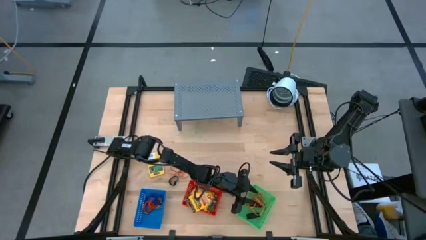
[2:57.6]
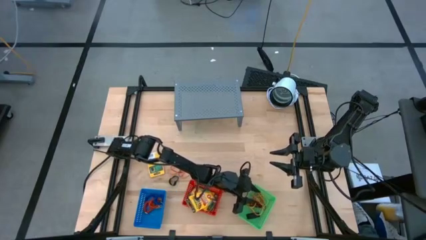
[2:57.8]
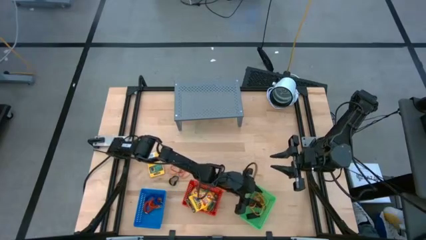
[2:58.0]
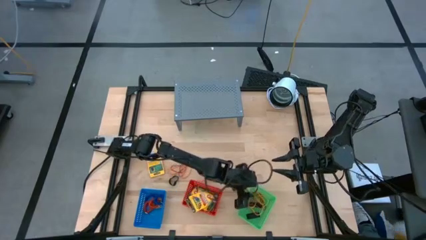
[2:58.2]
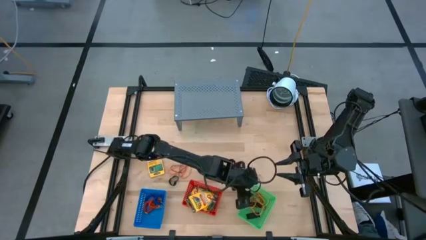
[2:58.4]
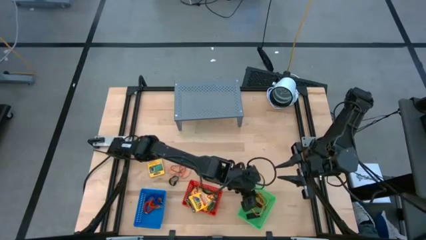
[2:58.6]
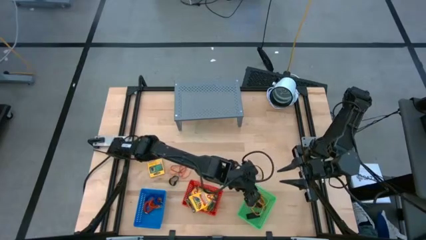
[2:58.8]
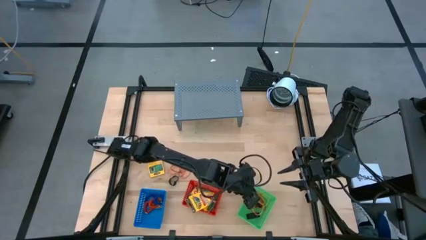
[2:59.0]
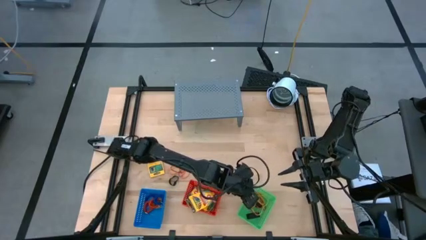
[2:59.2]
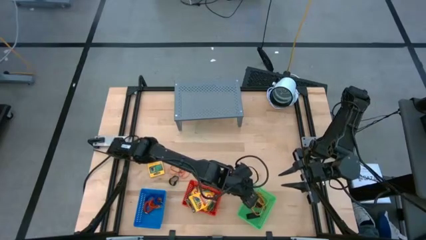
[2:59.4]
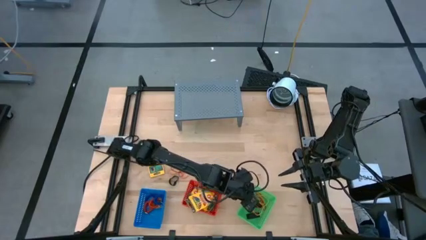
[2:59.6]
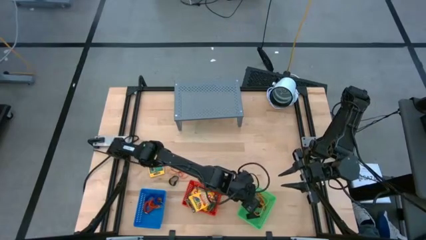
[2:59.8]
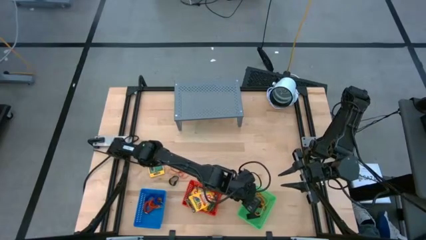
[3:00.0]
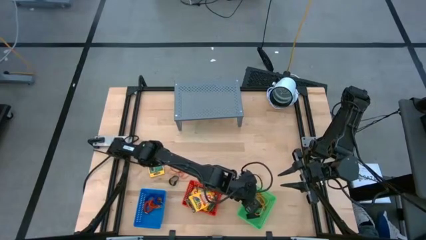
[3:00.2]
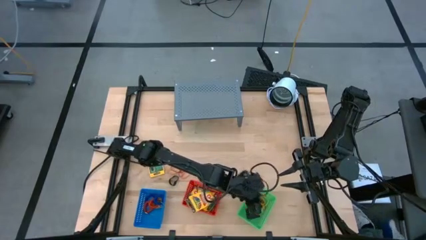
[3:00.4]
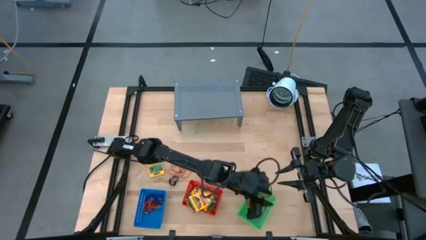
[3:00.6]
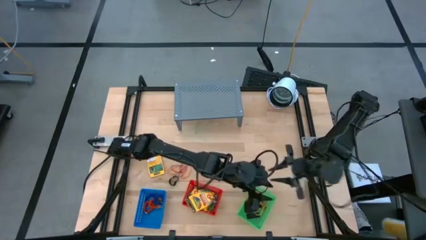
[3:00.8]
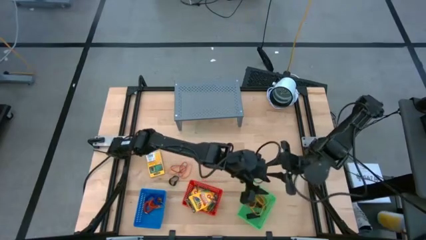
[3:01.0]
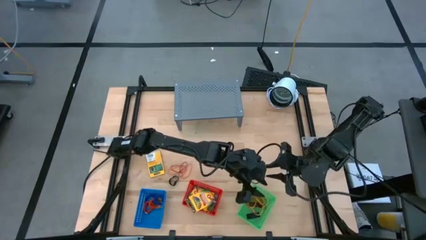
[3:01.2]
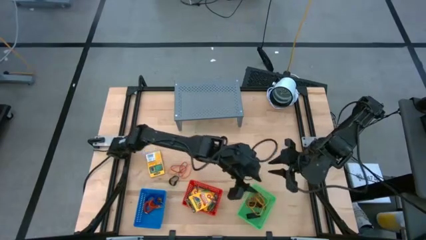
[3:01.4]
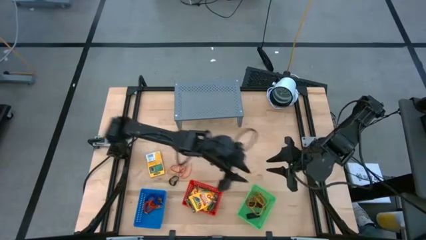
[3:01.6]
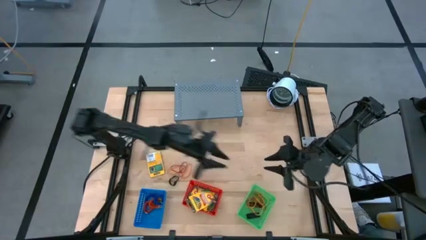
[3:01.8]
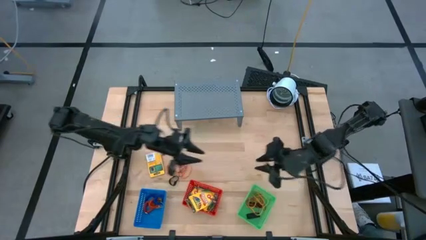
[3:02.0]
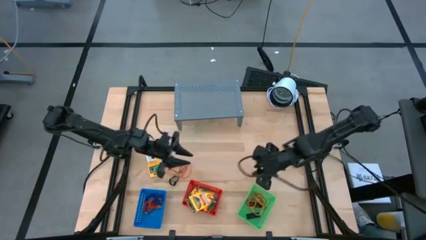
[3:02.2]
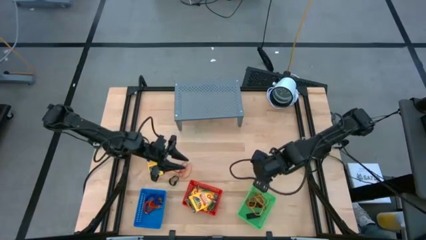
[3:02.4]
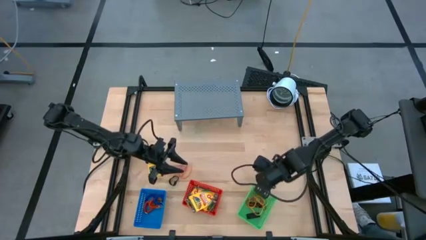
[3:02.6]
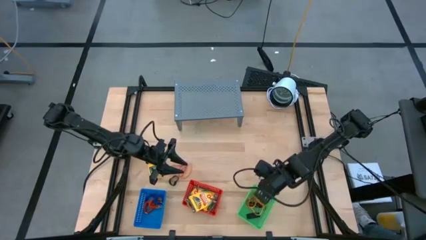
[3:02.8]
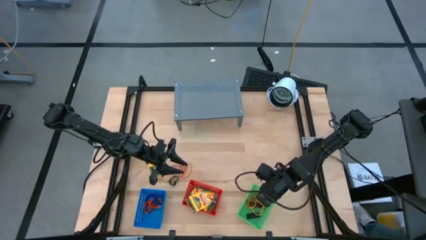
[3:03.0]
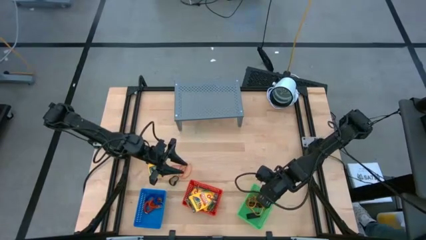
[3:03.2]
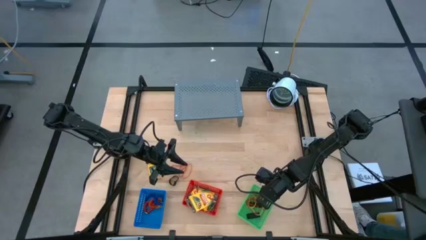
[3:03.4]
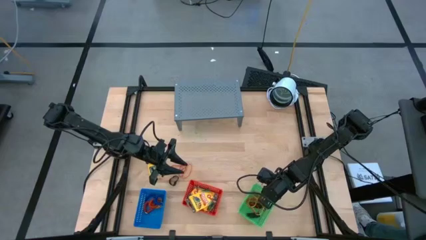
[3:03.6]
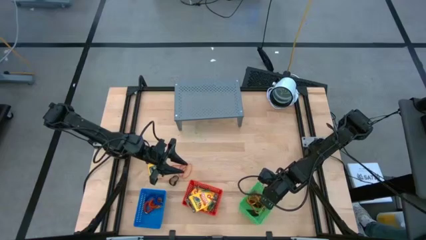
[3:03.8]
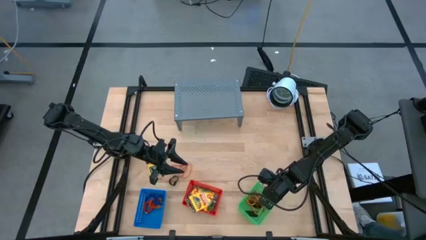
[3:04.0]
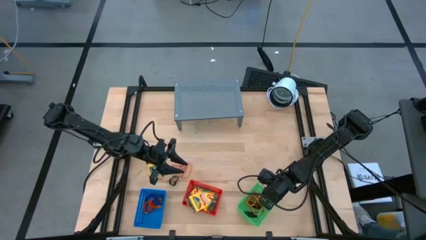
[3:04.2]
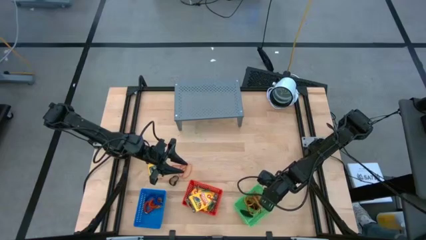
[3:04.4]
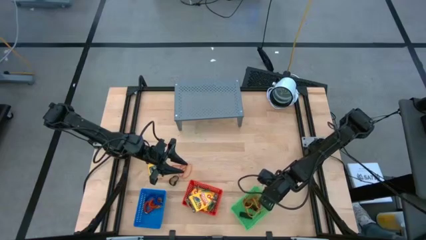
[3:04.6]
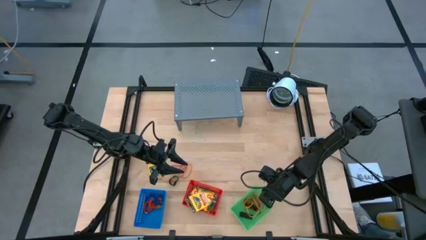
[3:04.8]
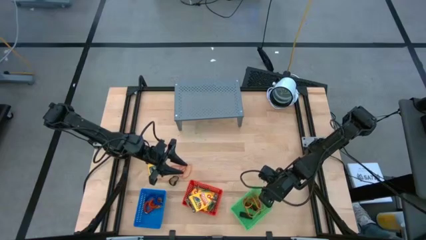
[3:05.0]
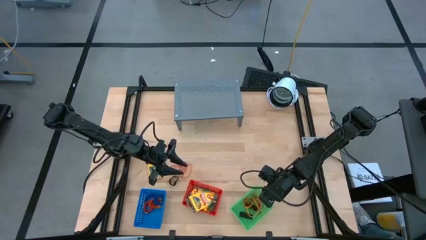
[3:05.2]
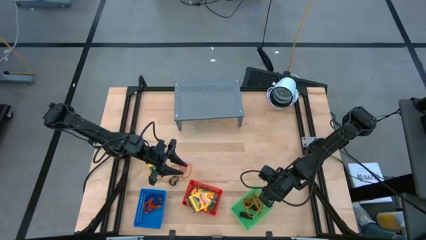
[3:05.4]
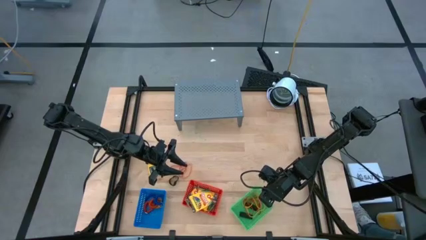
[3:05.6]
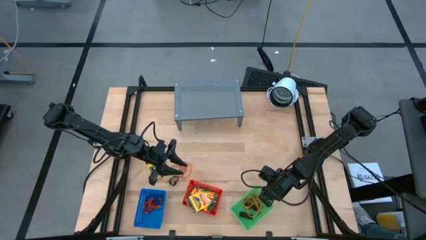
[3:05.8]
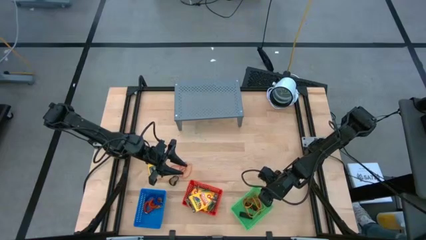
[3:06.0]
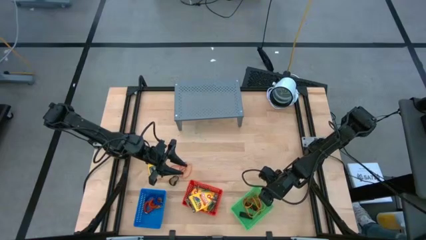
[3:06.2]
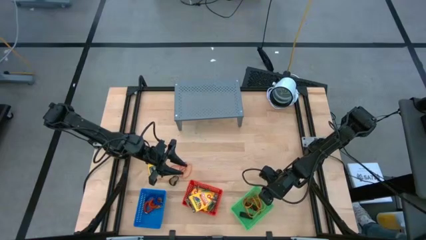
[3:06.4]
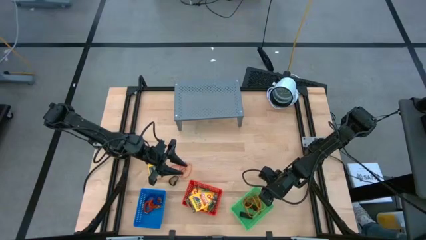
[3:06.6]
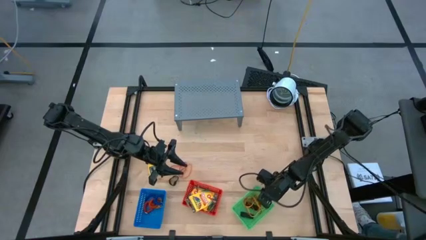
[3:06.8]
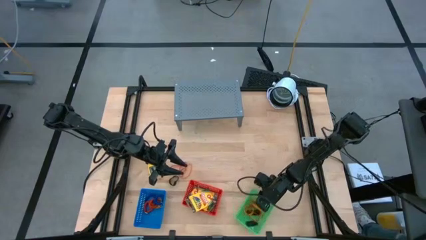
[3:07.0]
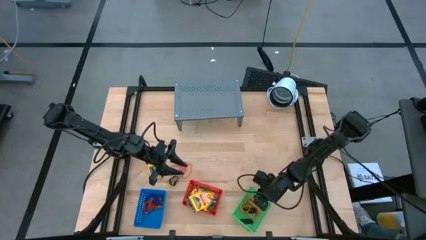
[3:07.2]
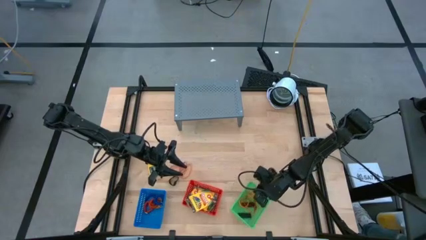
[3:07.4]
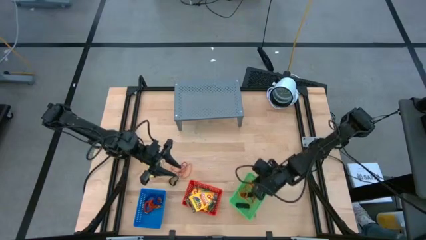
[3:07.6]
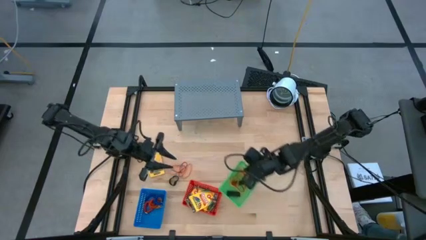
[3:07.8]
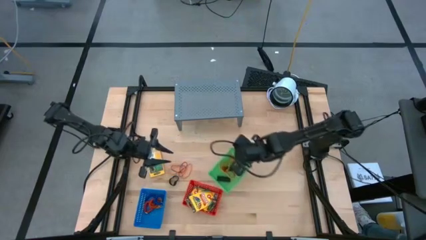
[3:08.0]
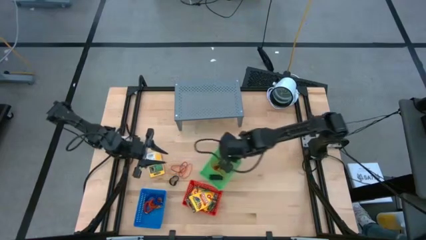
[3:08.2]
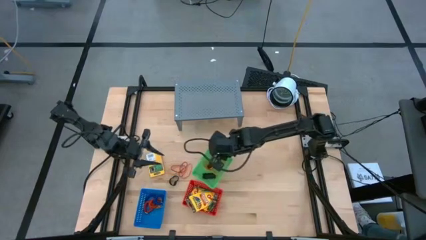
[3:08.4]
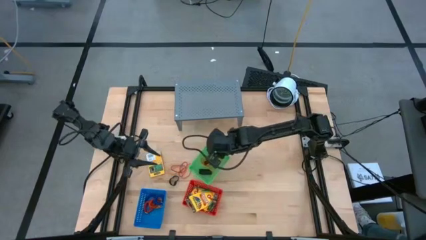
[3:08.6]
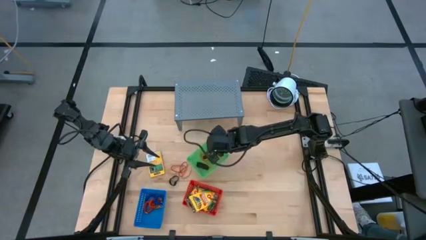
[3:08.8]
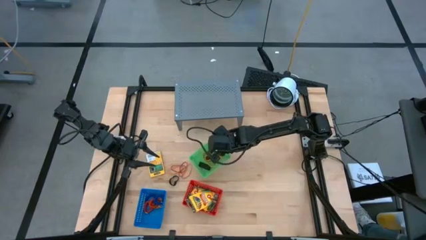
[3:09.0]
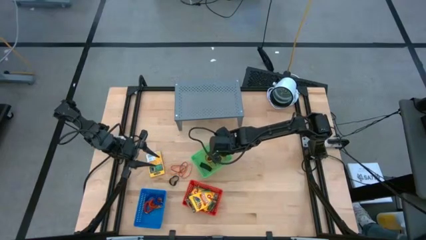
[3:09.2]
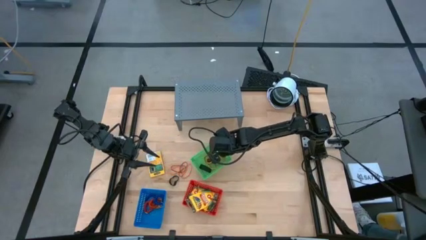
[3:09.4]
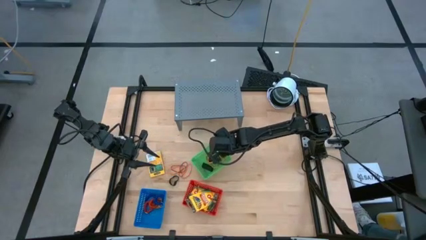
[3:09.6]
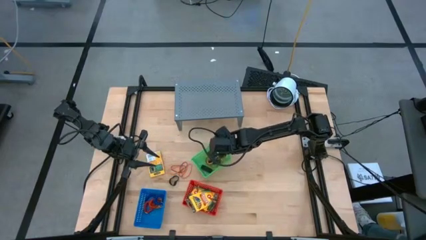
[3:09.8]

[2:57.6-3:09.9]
Task: Pick & Place Office Desk Supplies
Adjust the green basket
